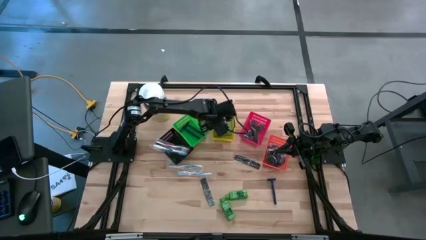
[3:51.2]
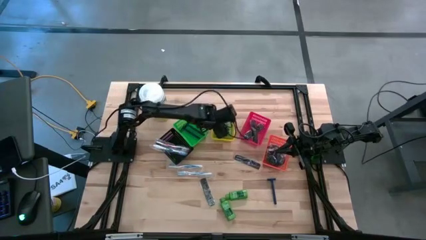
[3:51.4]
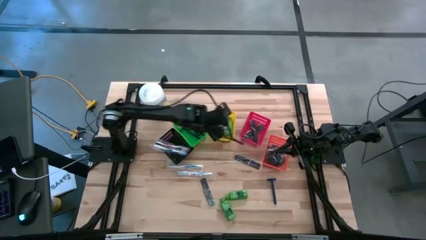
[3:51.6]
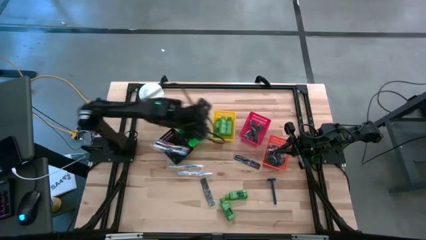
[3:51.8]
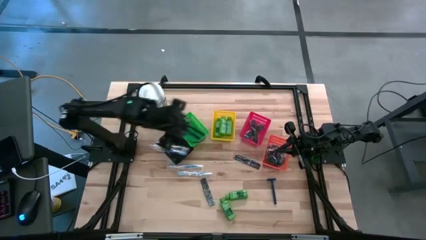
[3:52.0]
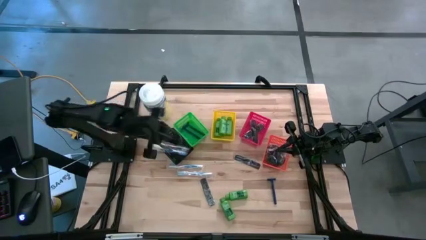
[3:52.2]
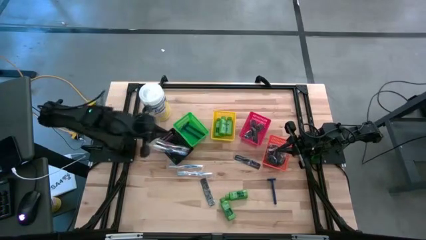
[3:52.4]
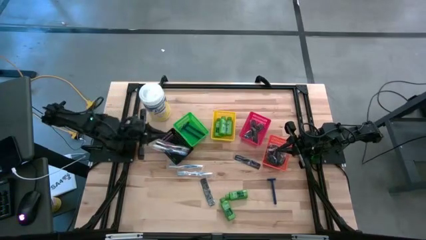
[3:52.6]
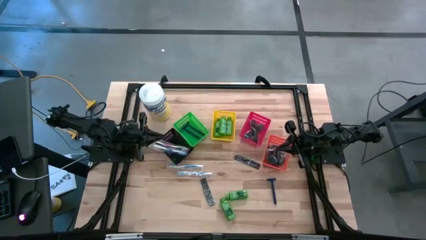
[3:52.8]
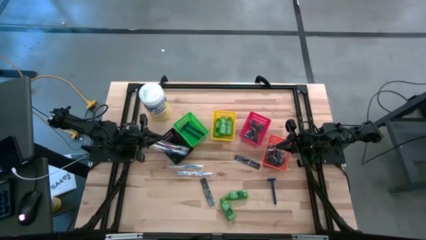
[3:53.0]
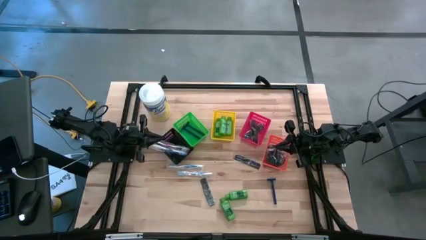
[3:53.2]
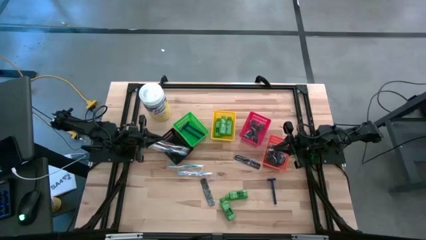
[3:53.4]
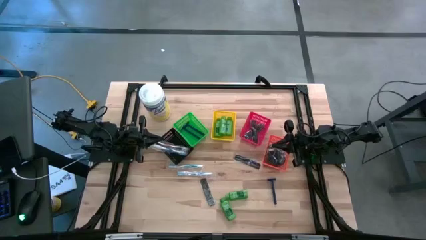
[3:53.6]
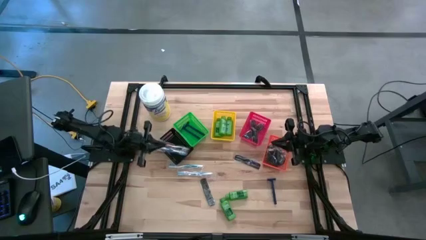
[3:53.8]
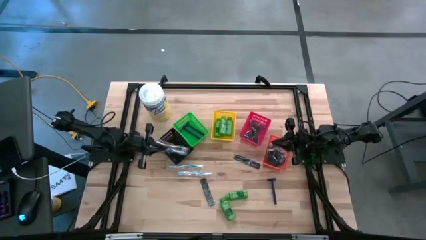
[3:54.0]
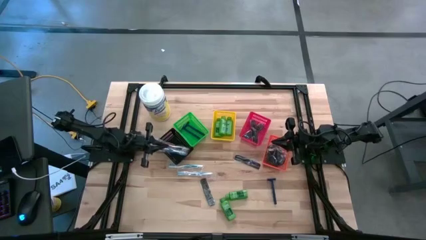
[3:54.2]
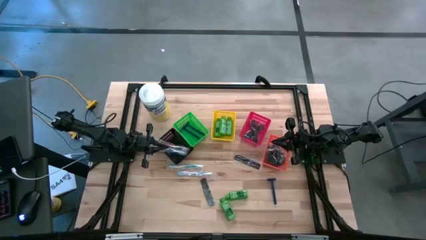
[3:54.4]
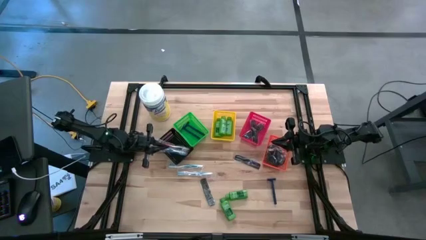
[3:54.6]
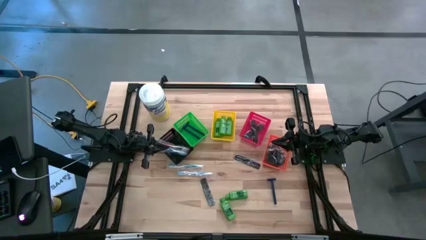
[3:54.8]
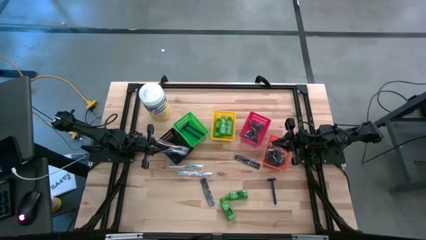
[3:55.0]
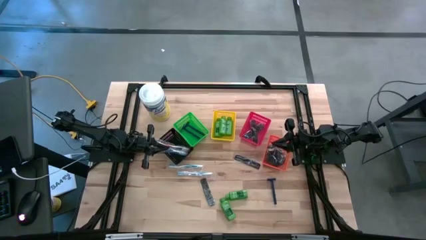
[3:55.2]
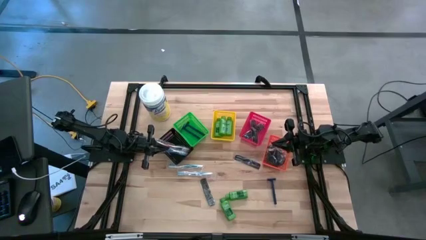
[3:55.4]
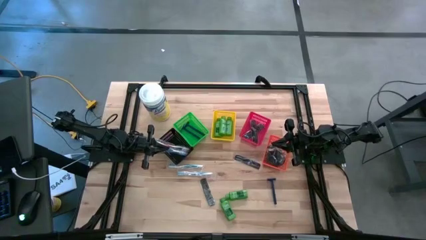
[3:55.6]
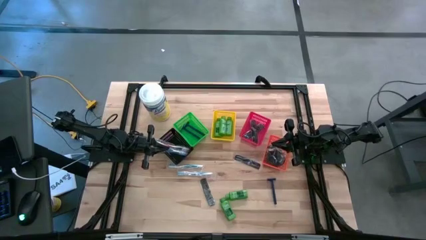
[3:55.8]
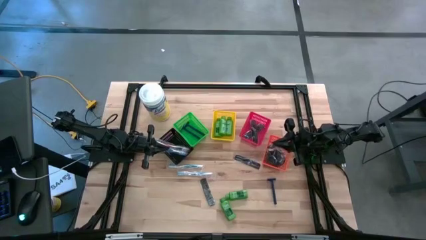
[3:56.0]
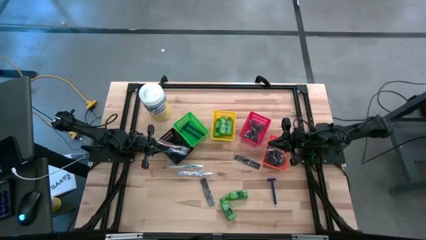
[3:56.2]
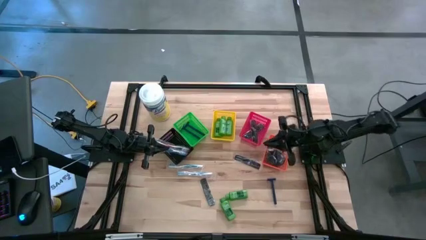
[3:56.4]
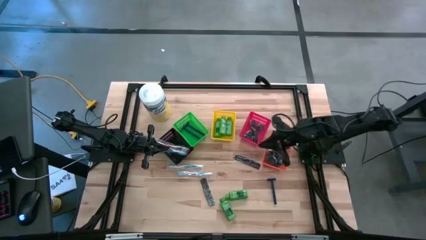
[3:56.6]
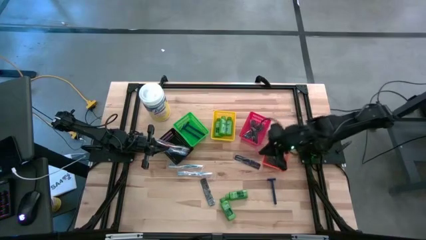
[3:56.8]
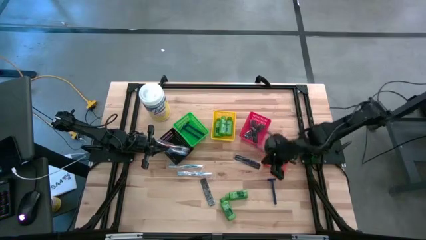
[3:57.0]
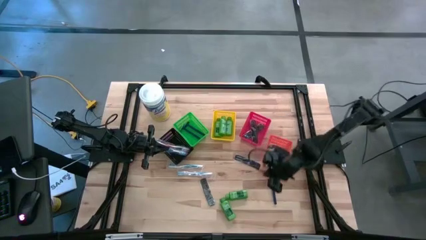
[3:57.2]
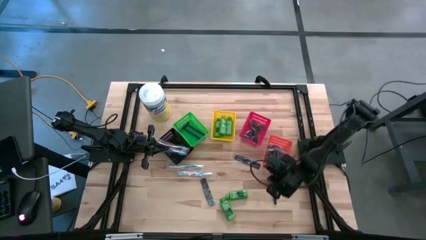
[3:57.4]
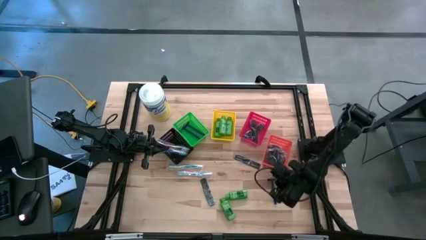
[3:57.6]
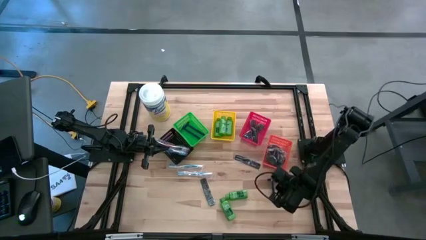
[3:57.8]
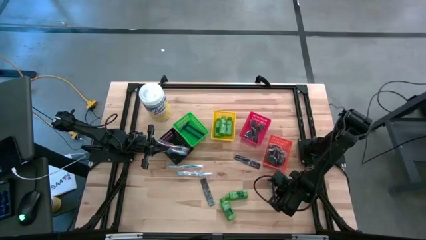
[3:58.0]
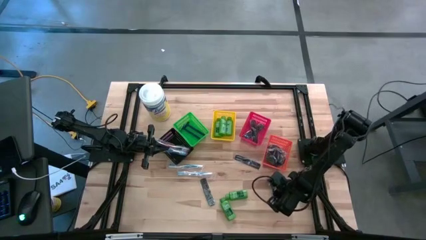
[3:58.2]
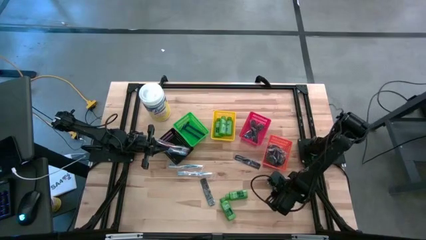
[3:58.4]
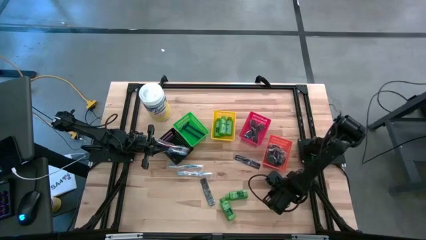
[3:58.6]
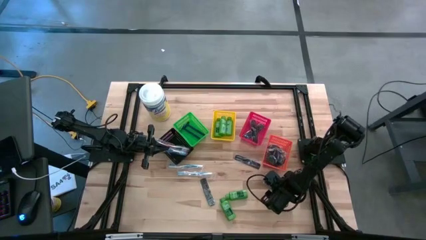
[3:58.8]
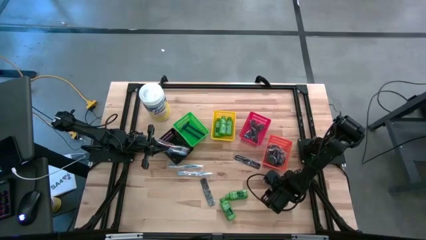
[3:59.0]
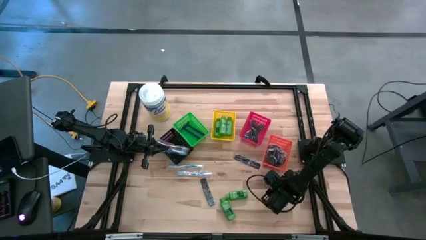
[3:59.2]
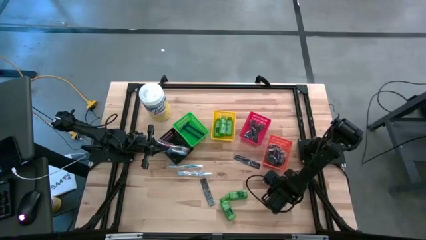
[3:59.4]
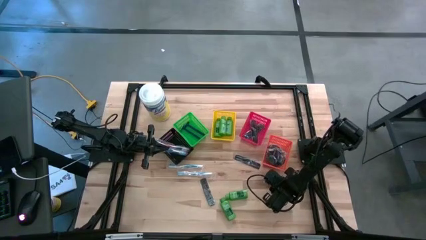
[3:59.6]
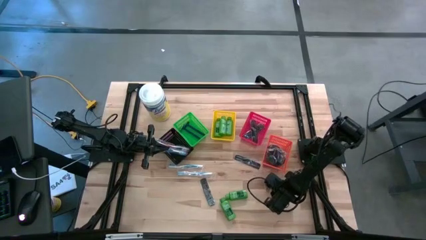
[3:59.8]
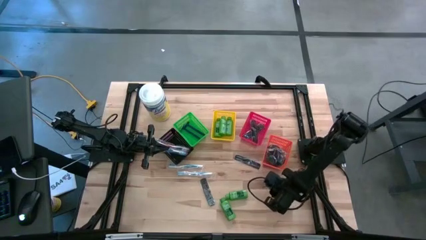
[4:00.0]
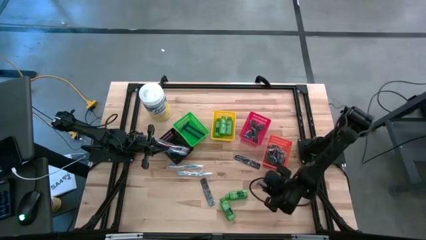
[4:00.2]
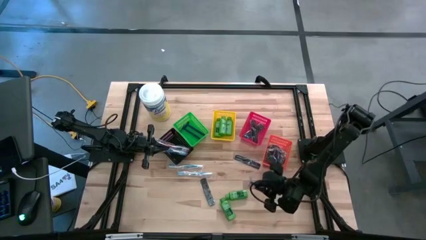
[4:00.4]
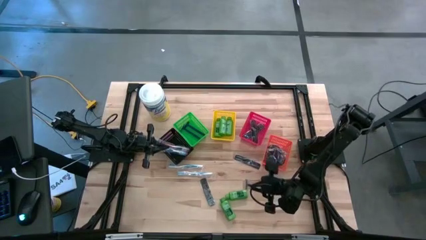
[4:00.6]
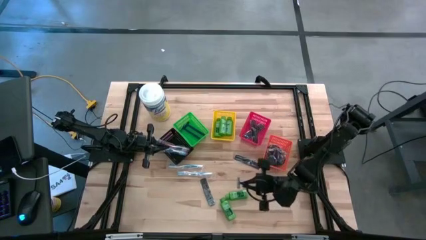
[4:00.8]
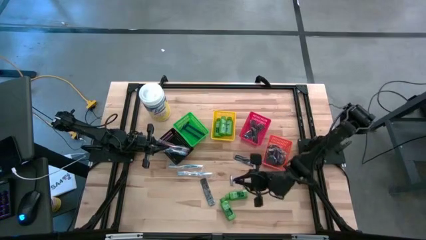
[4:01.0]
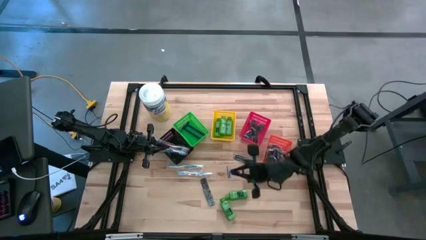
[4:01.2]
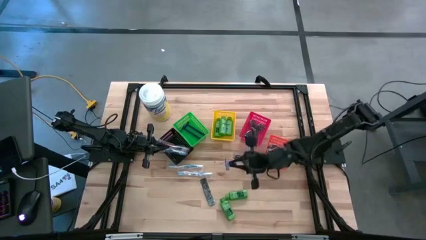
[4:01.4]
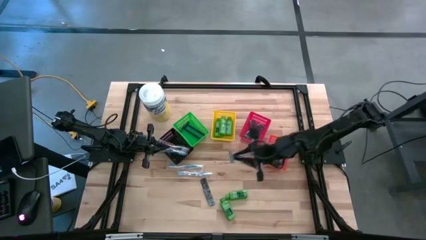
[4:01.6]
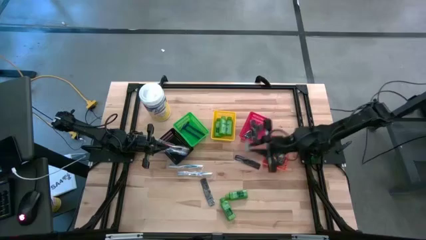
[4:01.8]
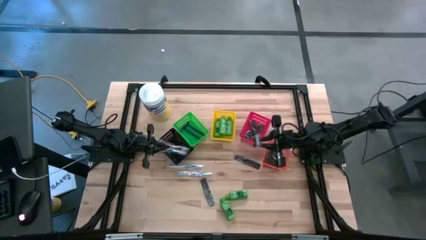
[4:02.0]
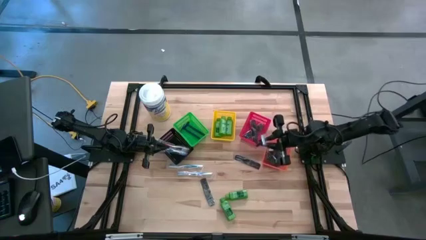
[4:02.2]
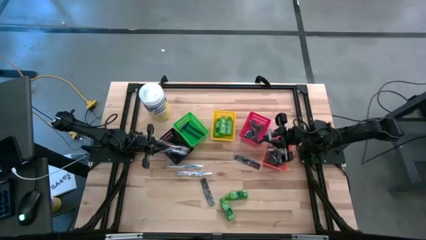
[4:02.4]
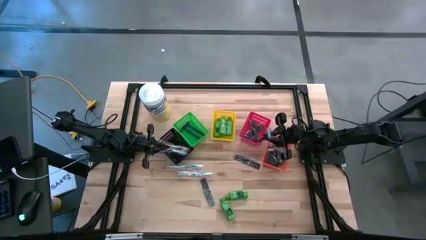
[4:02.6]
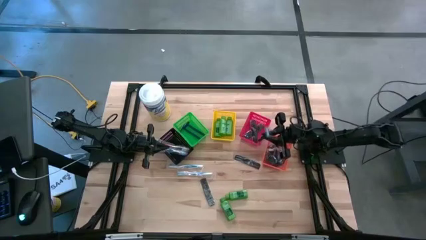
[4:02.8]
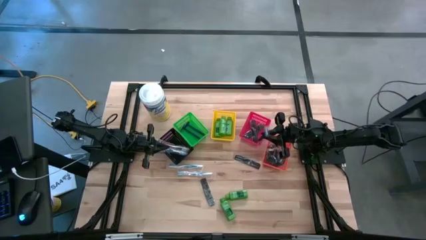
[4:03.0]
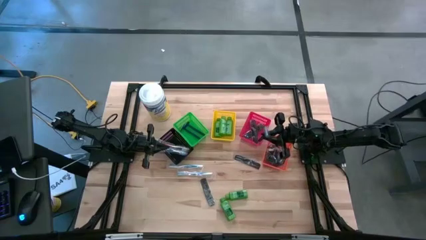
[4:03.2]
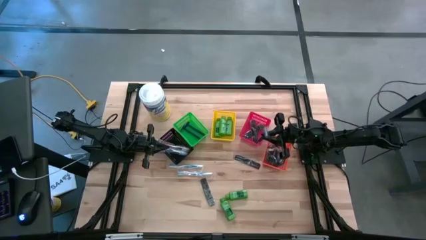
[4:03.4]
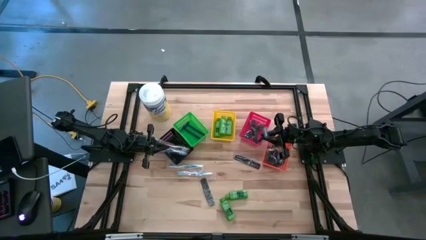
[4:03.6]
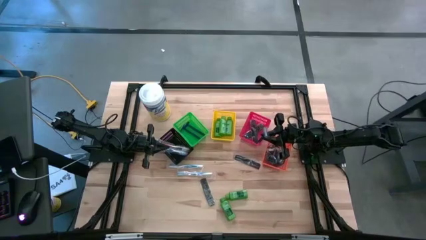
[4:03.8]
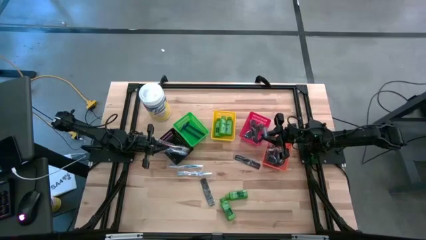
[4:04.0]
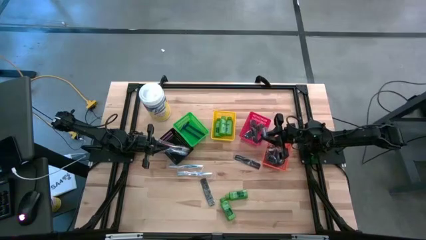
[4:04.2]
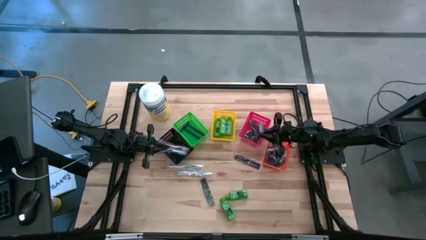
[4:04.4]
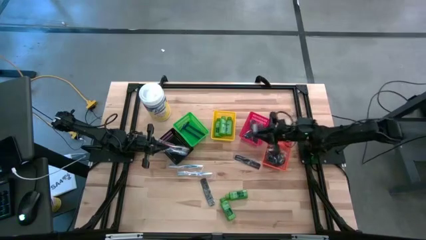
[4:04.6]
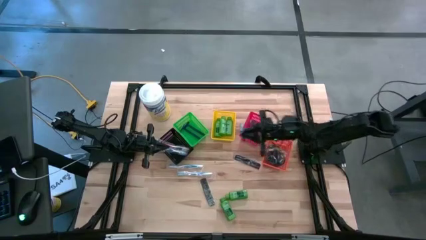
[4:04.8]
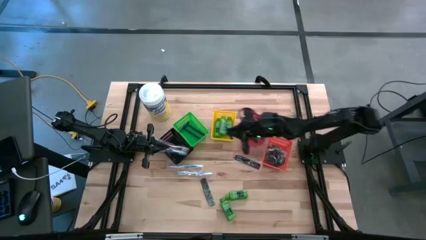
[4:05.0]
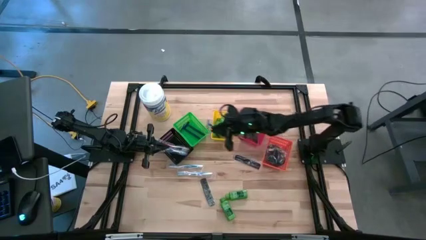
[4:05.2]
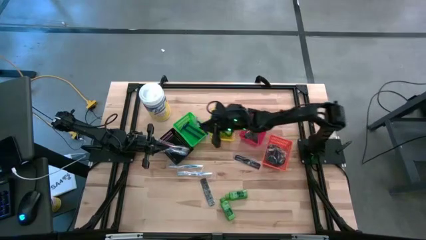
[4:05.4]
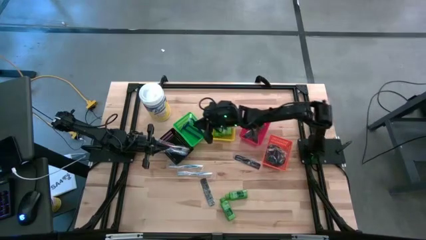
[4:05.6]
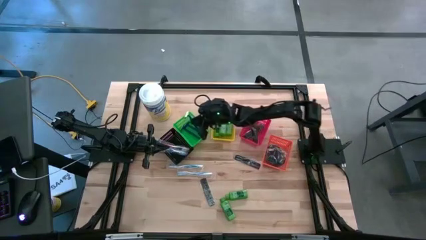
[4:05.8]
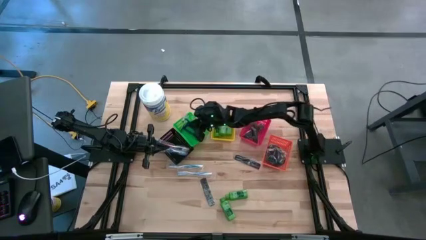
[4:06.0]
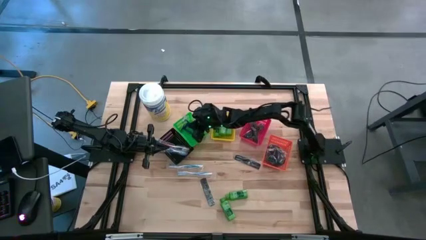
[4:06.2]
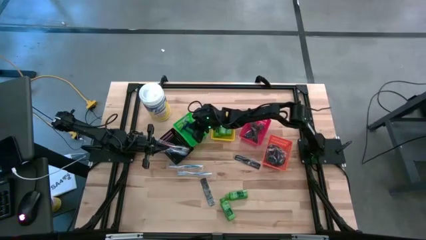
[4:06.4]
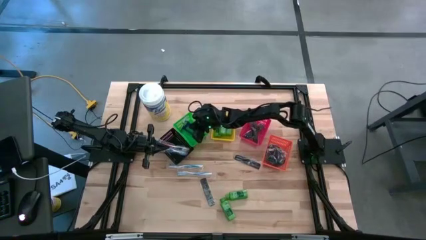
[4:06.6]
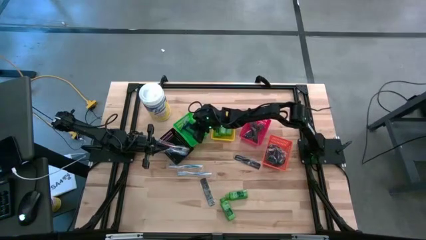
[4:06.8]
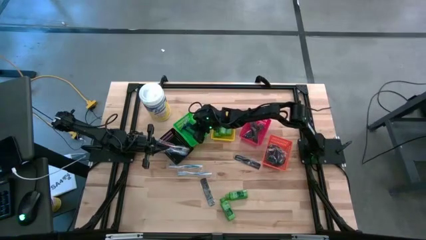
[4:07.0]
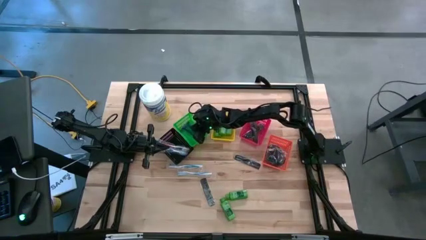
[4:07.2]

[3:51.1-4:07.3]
Task: Pick & Place Travel size toiletries
Put the blue shaver into the green bin

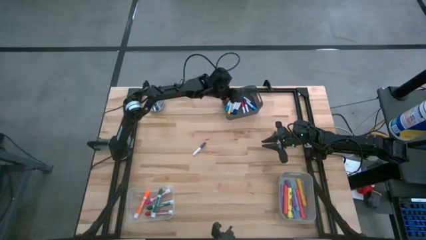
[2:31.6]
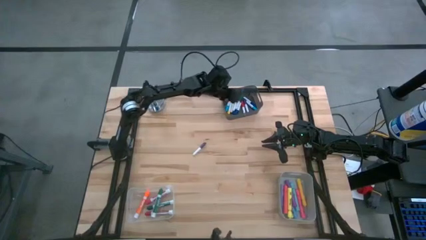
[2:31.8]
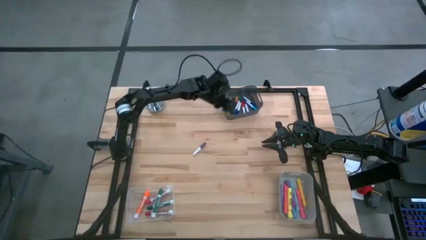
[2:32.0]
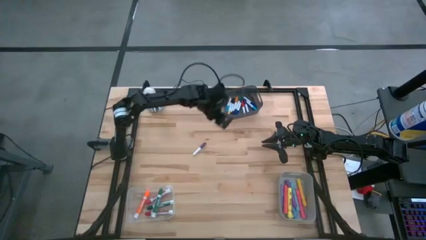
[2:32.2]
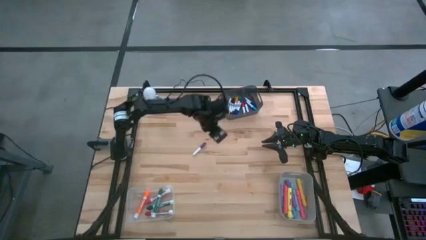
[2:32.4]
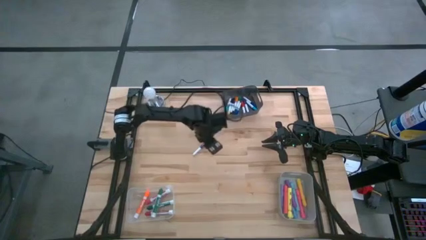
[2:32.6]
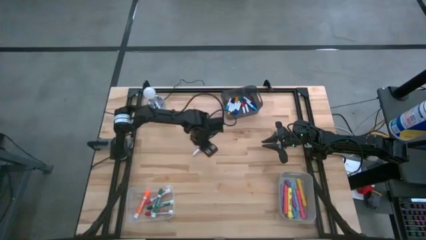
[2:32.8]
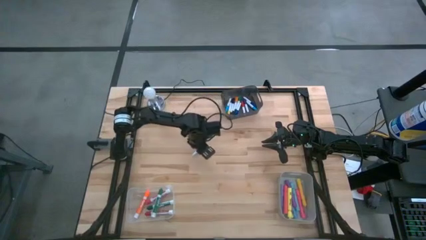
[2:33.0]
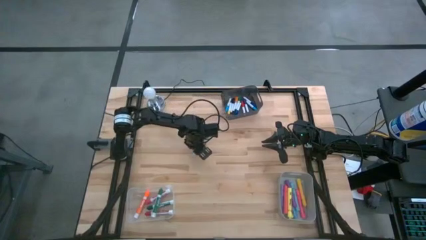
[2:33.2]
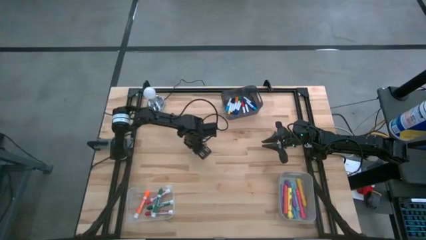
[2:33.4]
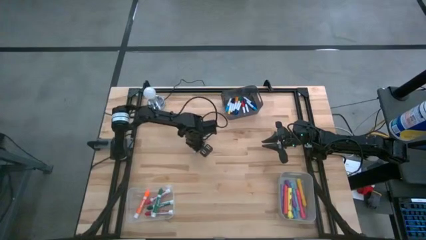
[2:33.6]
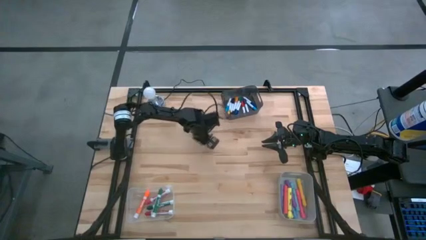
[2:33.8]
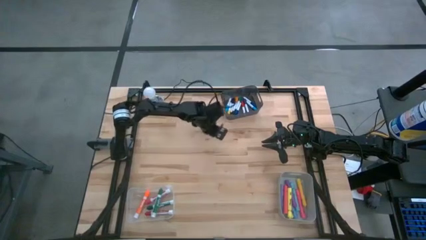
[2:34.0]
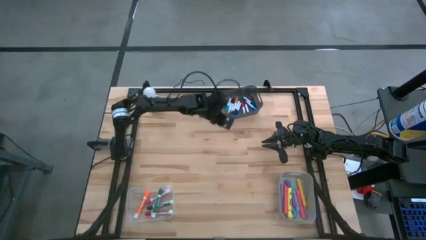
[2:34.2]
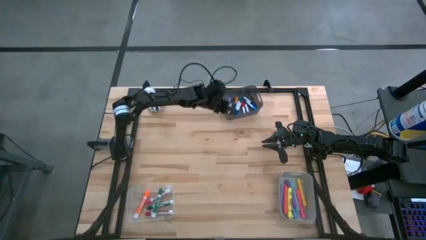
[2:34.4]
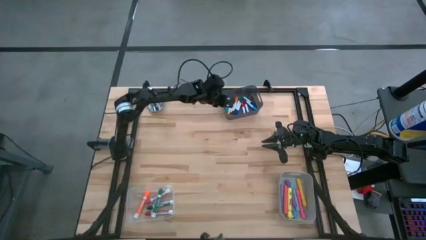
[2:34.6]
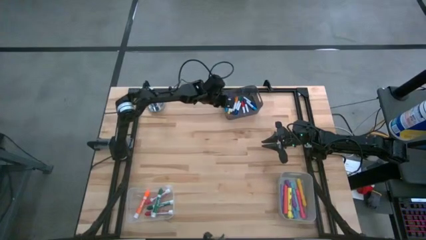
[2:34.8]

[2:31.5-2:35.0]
Task: Pick & Place Markers
Put the small purple highlighter pen into the black bin
